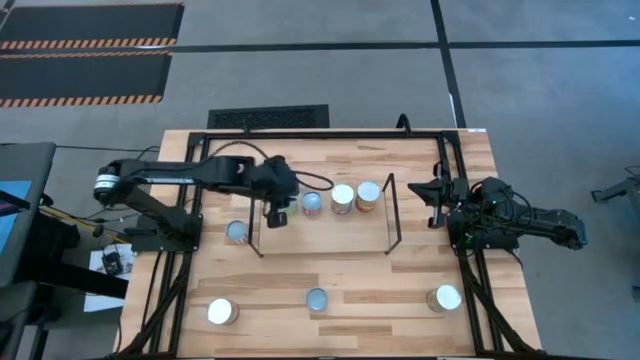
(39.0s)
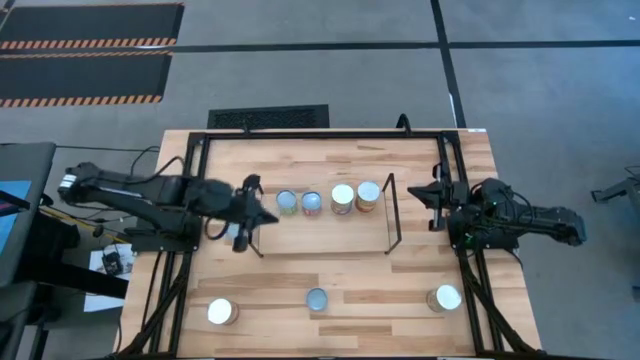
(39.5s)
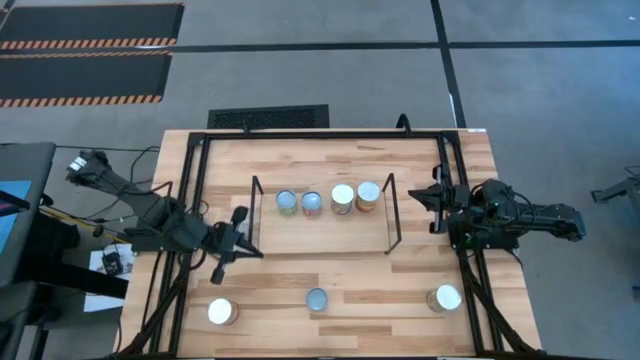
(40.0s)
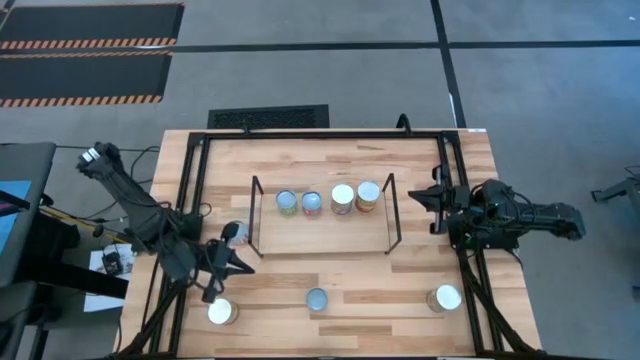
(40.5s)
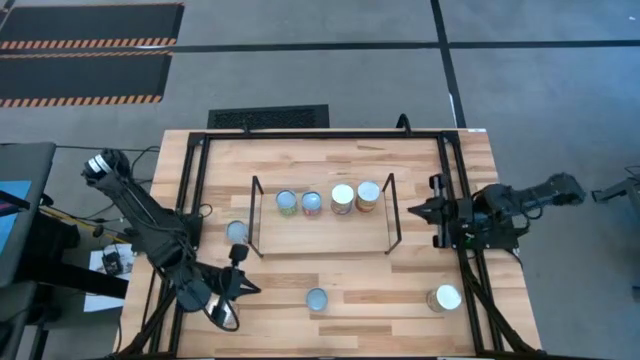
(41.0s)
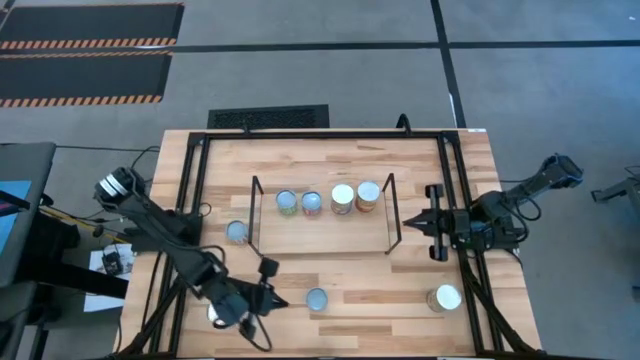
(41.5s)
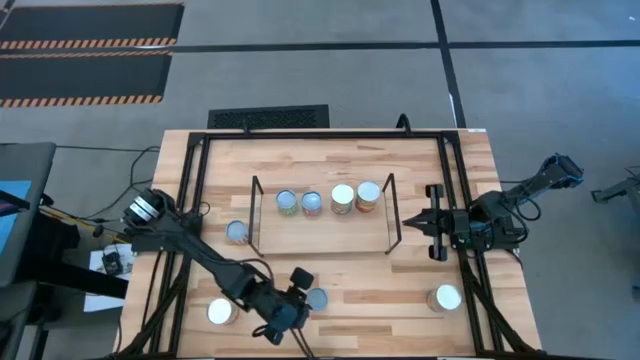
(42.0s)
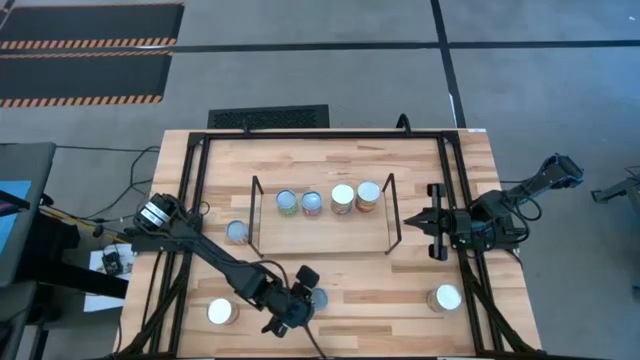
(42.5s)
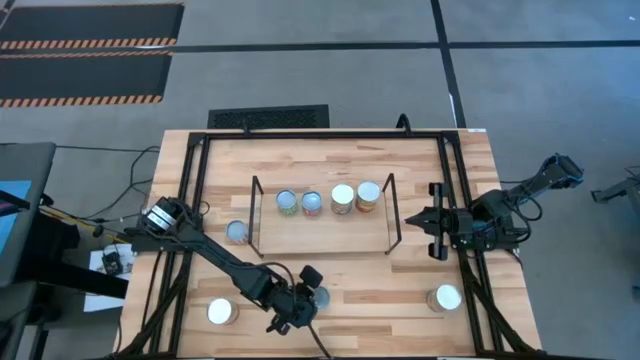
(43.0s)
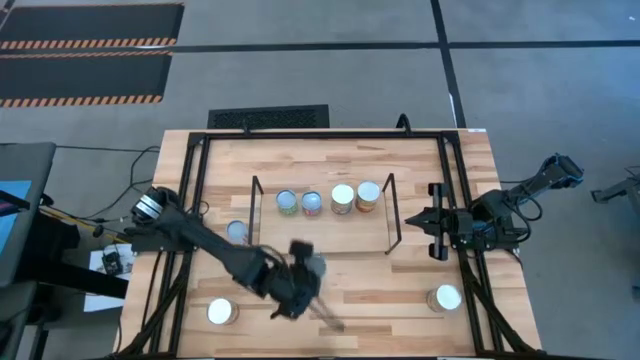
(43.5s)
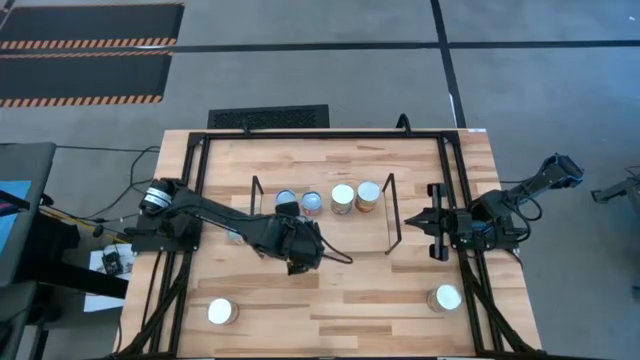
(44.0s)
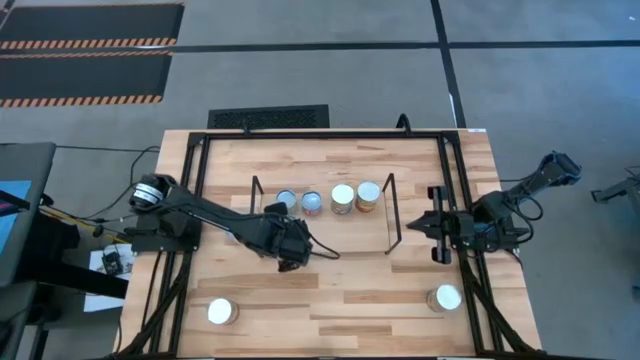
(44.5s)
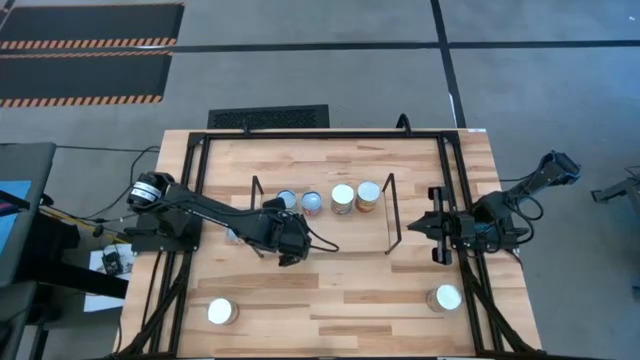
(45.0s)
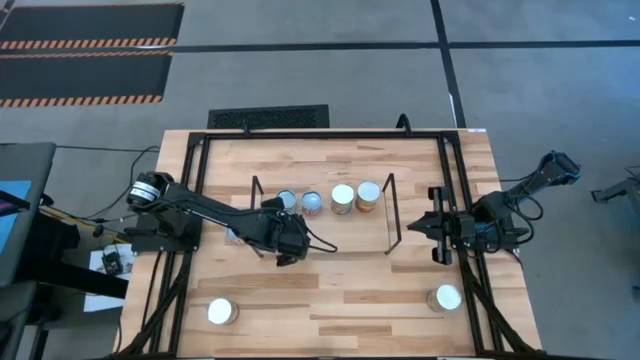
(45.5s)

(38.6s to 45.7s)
Task: Pick and place cans onto a shelf
Put the canned oranges on the shelf

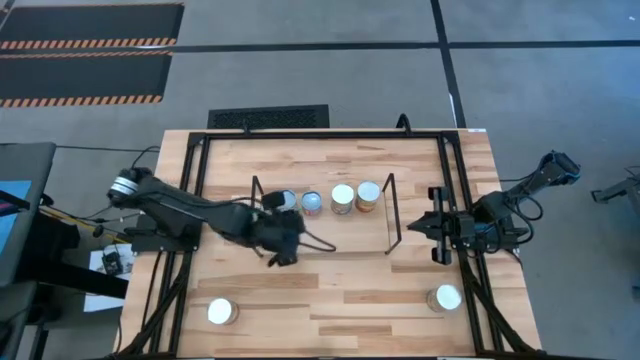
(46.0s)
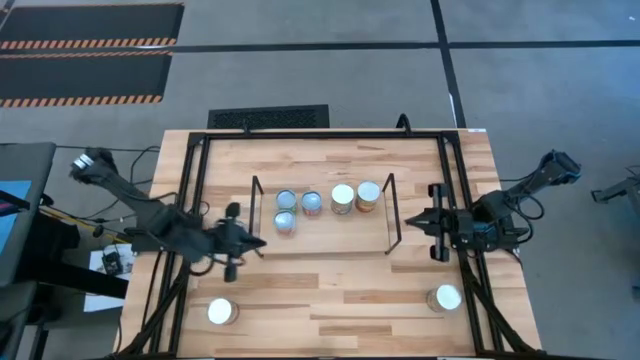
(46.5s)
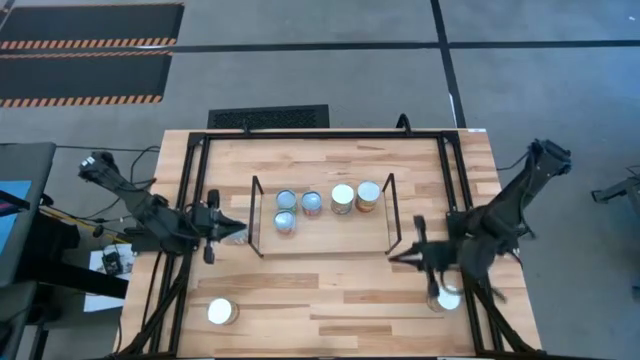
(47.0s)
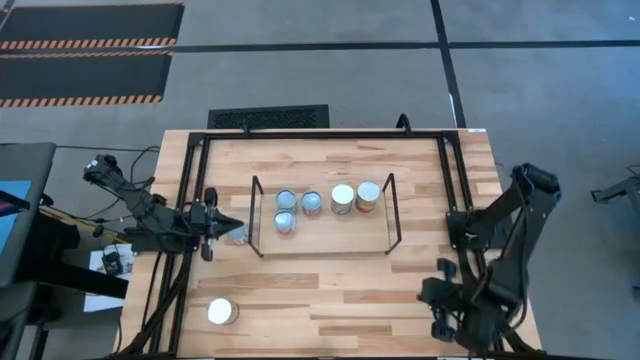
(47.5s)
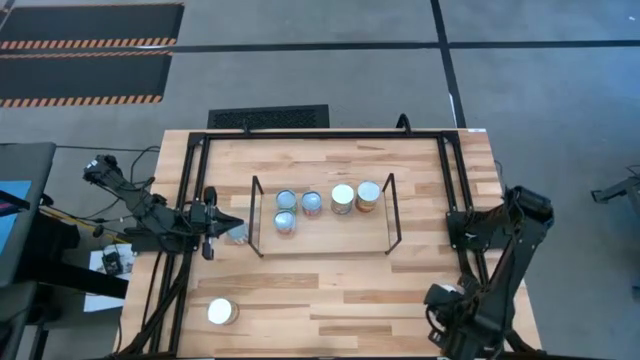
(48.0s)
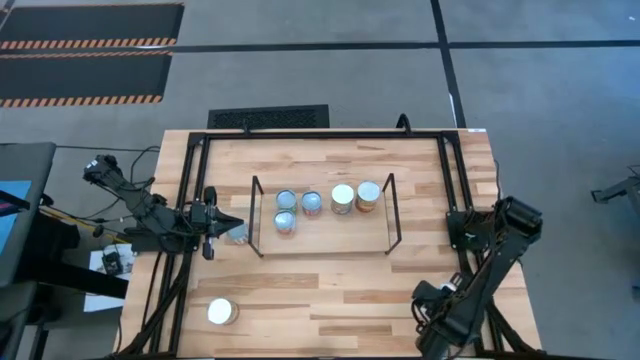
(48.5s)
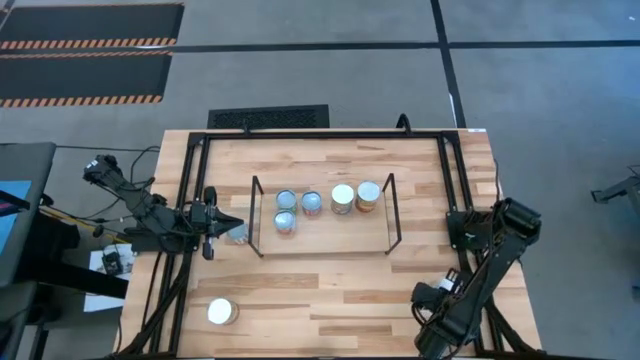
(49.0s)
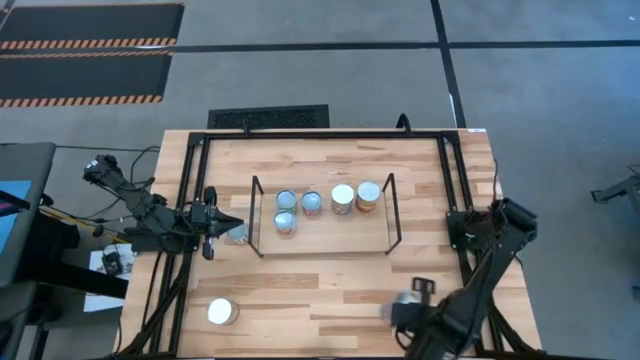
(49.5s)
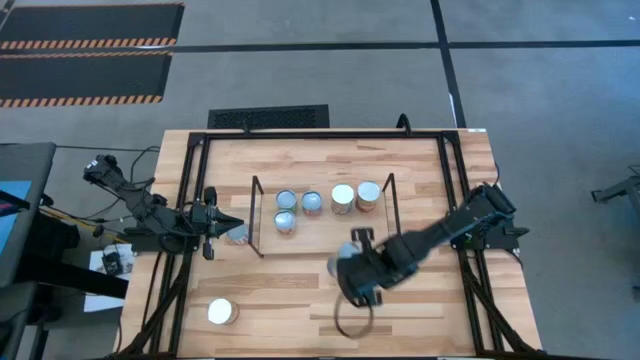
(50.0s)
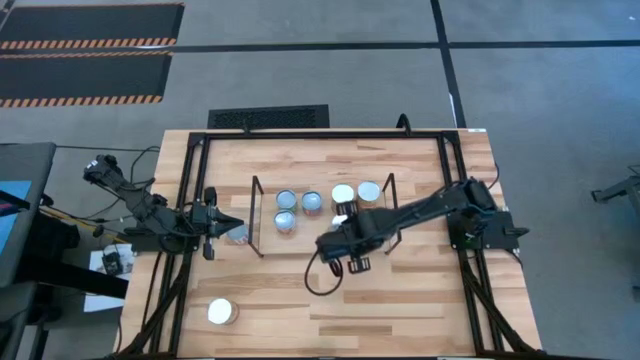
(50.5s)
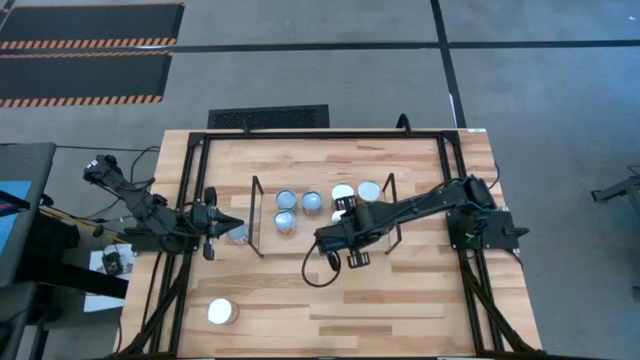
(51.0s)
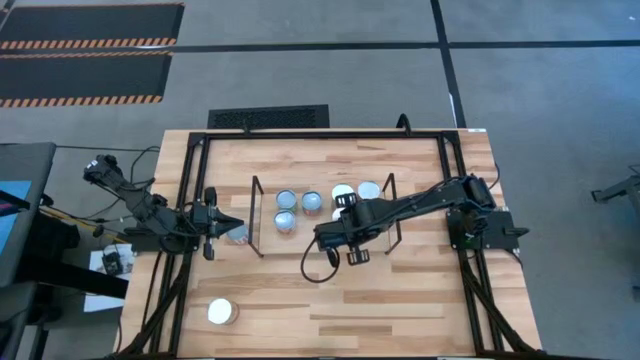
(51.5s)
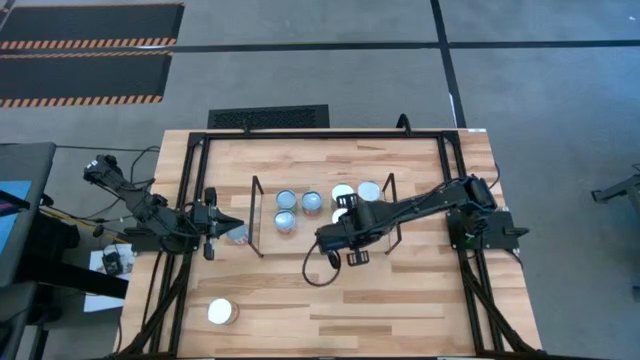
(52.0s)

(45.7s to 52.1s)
Put the canned peaches on the shelf aligned with the other canned peaches

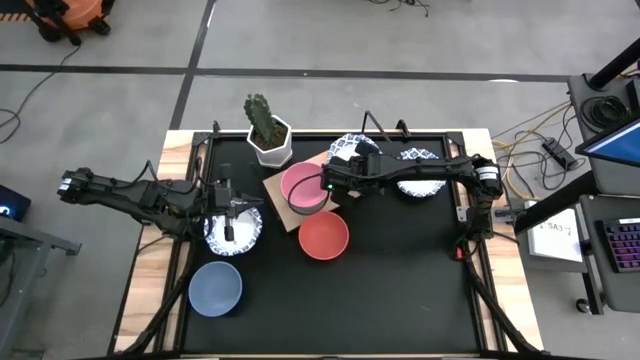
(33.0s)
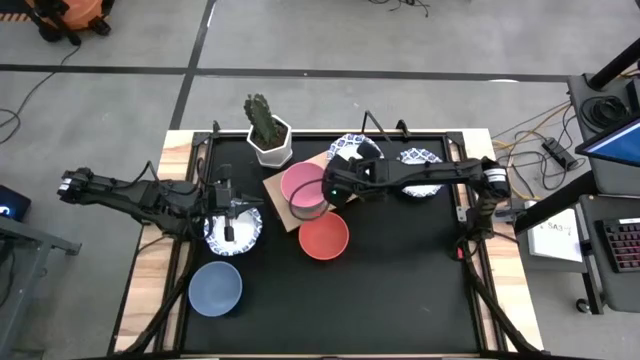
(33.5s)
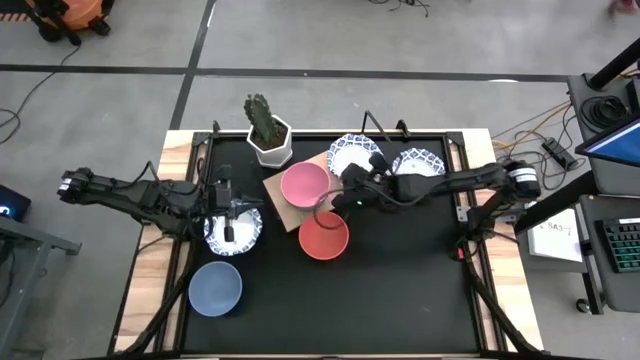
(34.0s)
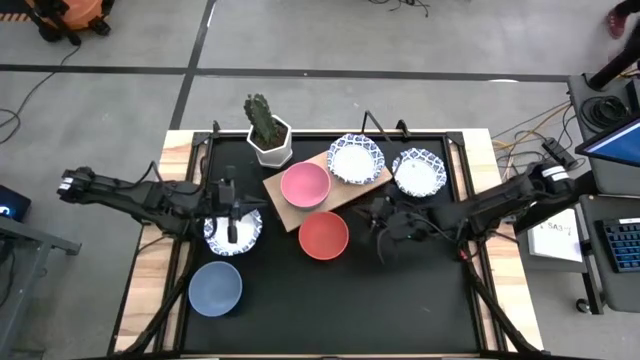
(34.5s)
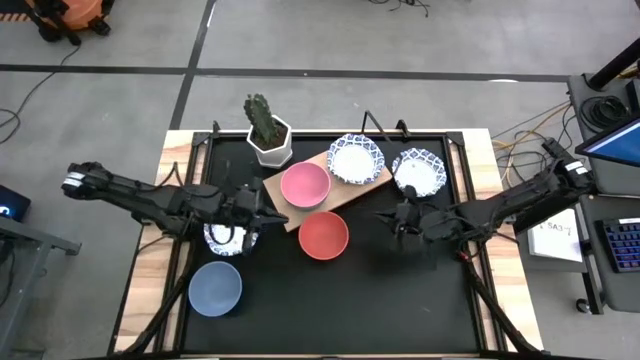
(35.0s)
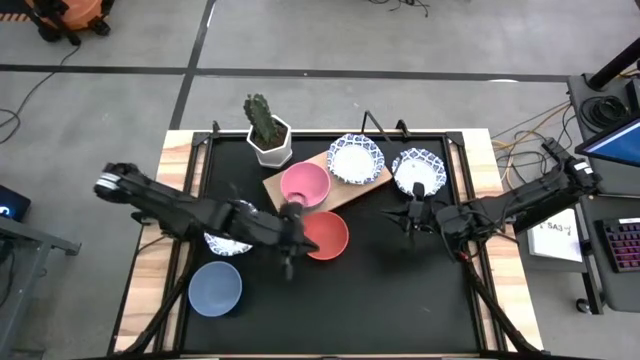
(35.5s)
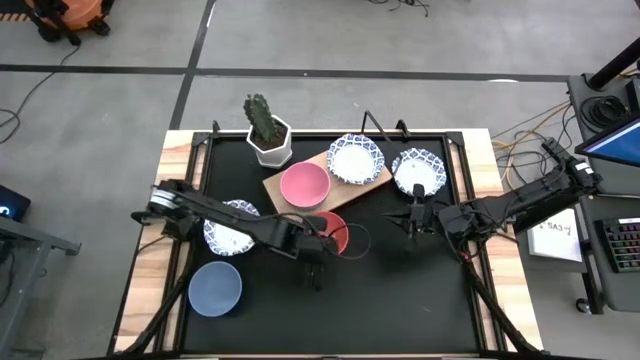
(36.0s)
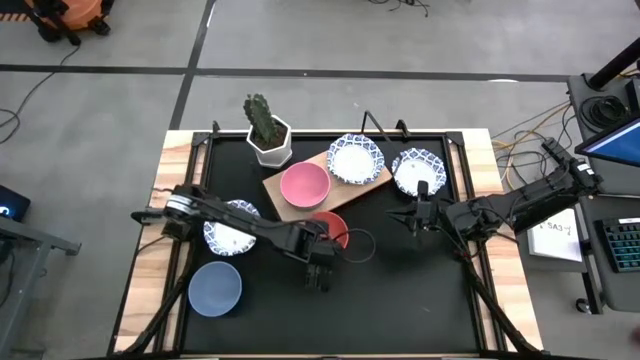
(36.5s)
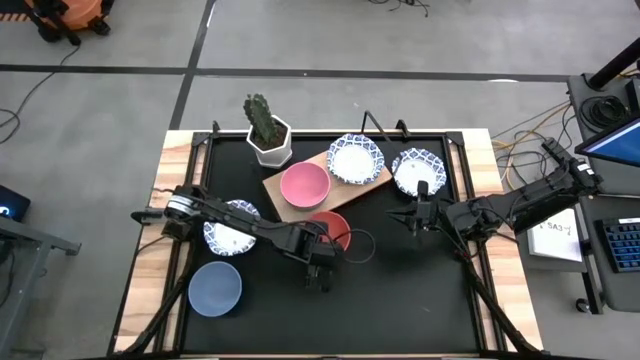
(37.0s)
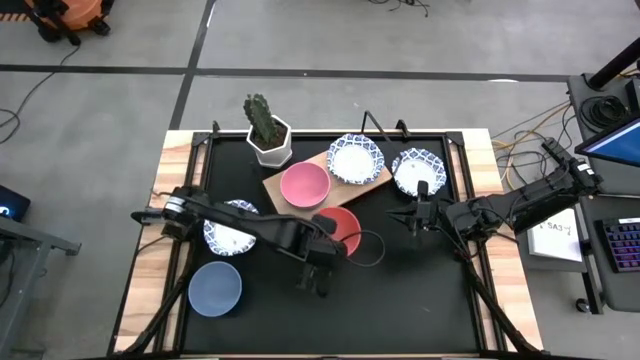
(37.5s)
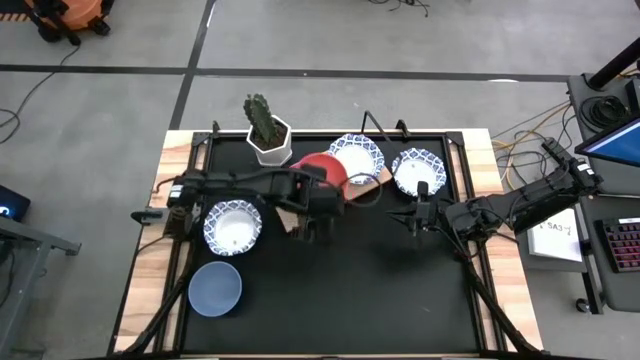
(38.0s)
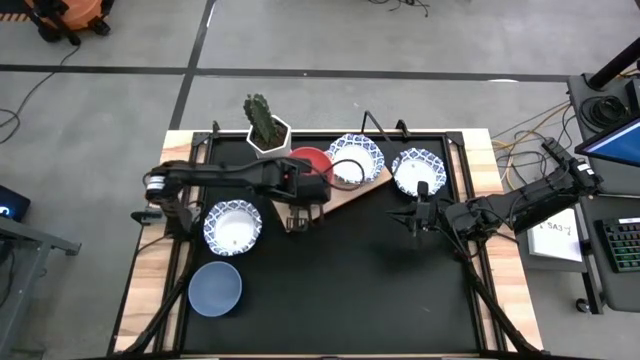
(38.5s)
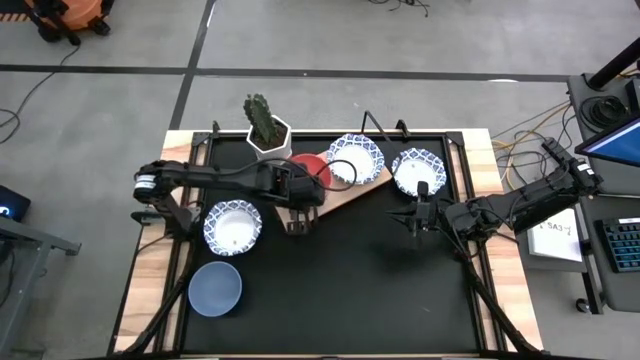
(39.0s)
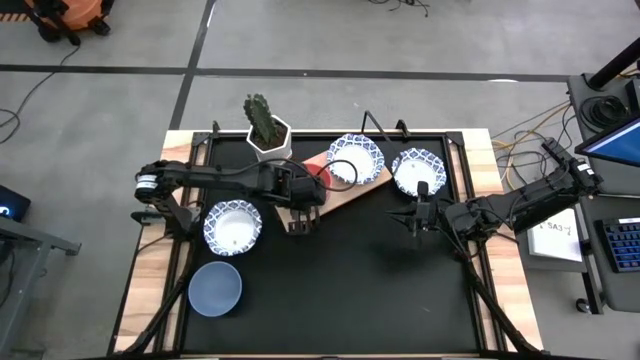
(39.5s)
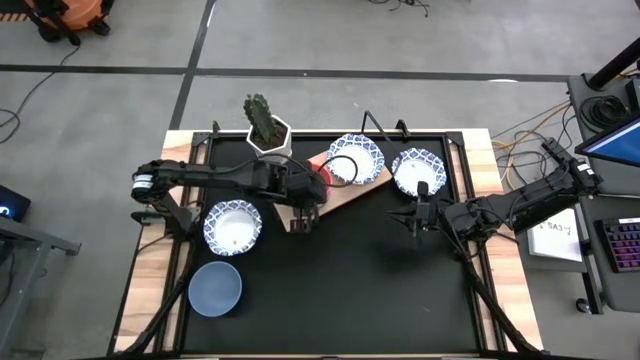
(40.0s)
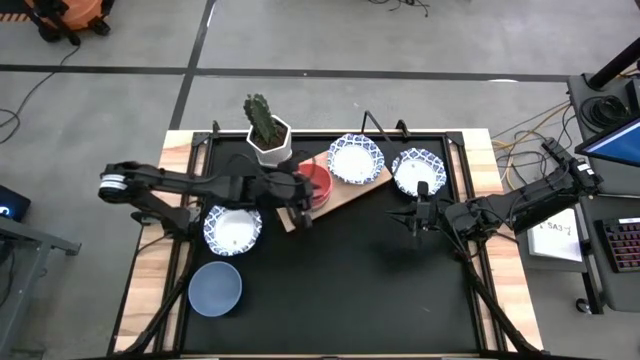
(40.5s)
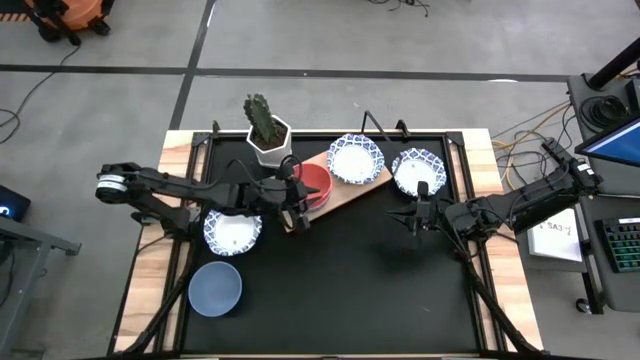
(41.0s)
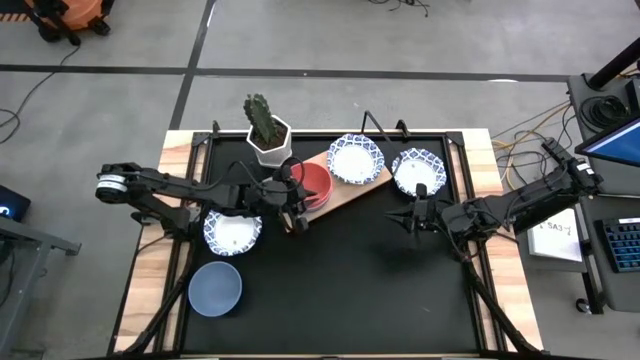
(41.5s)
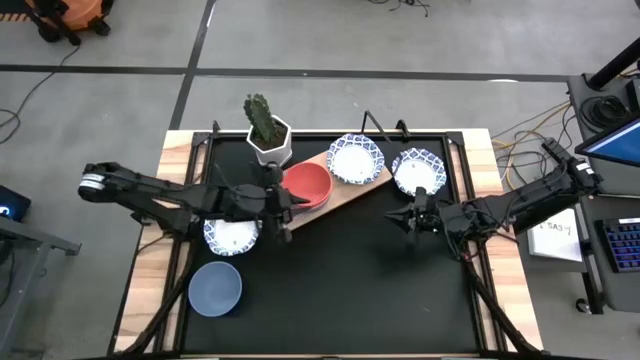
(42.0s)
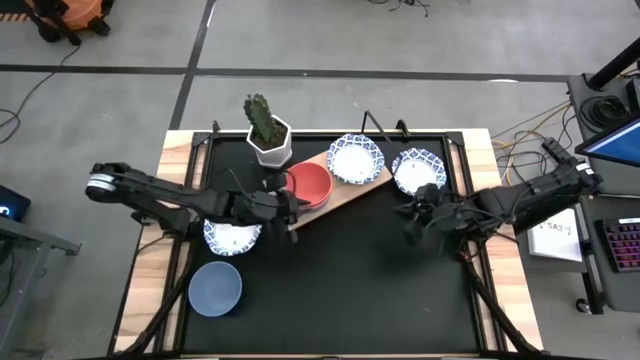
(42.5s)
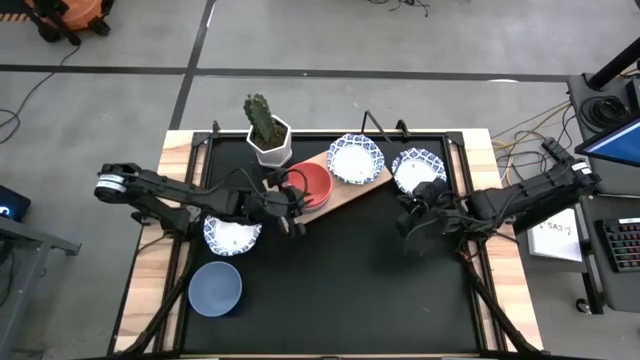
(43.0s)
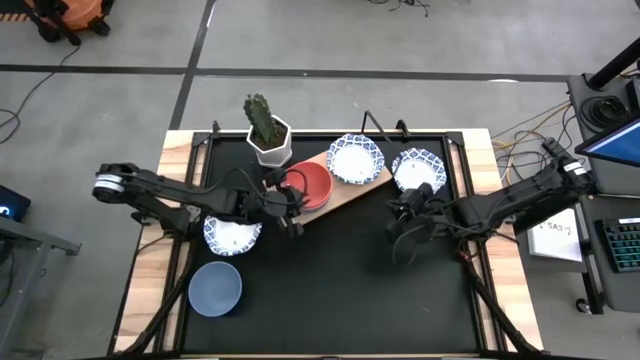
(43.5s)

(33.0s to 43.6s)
Task: Place and stack bowls onto a shelf
Stack the orange bowl on top of the pink bowl on the shelf
